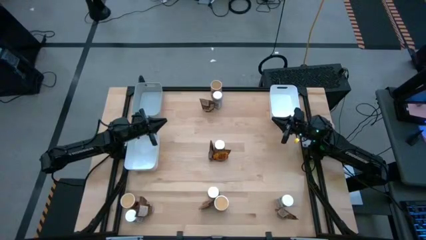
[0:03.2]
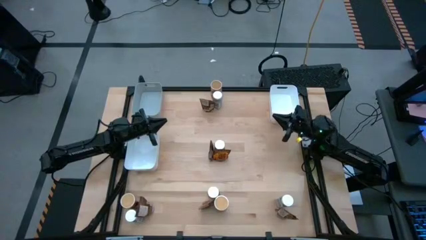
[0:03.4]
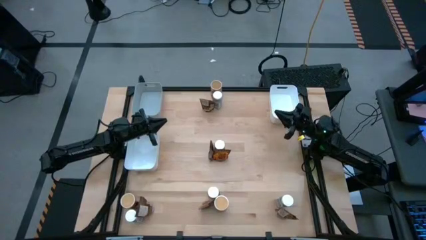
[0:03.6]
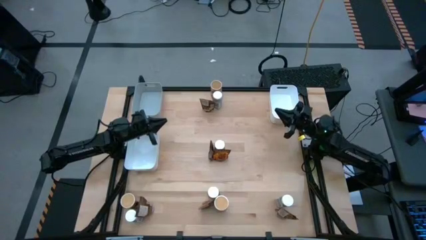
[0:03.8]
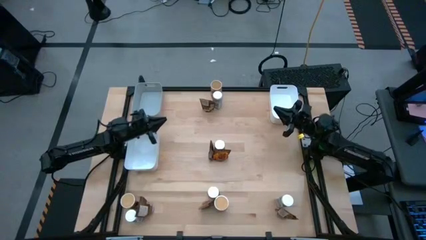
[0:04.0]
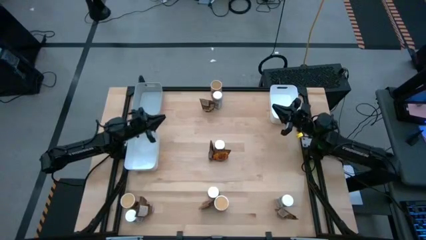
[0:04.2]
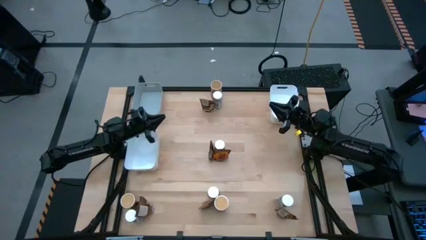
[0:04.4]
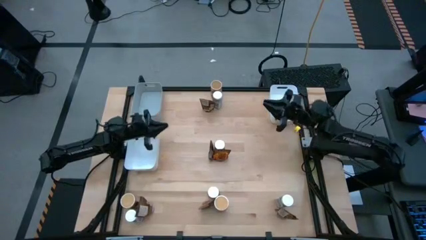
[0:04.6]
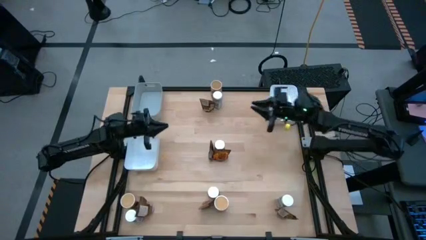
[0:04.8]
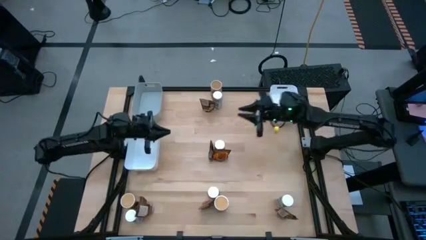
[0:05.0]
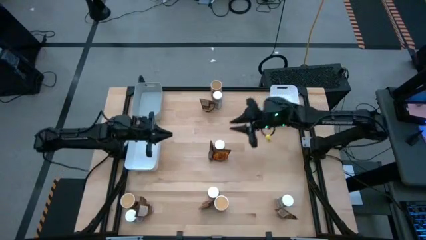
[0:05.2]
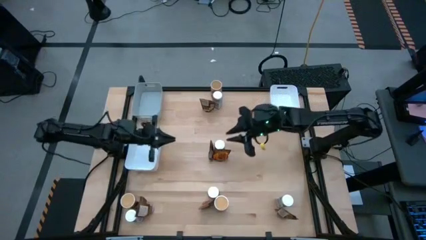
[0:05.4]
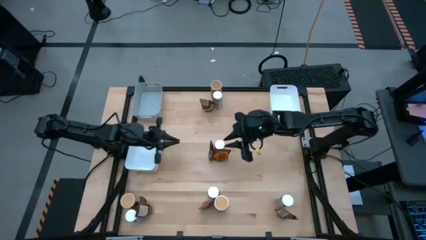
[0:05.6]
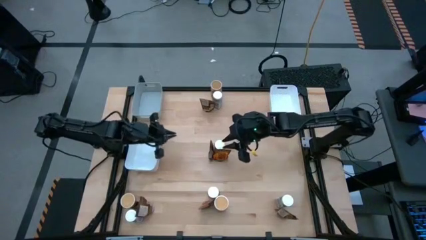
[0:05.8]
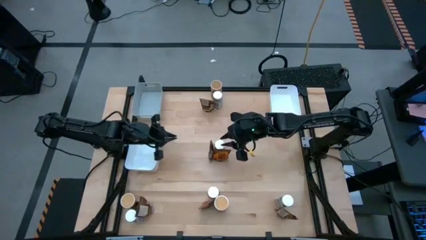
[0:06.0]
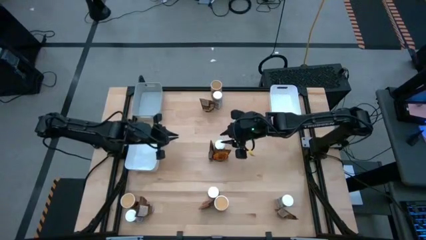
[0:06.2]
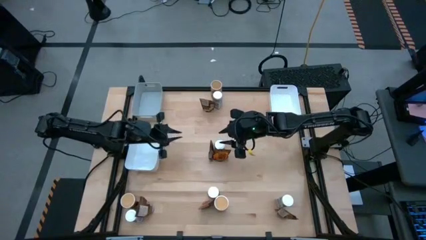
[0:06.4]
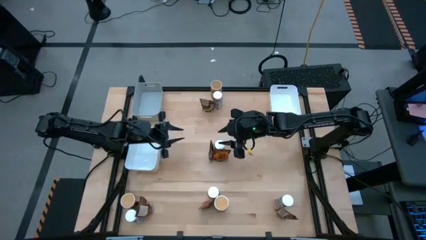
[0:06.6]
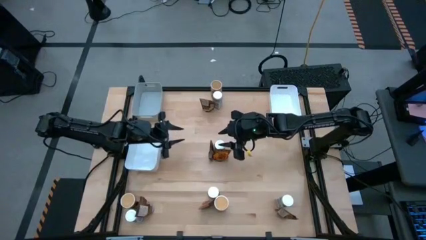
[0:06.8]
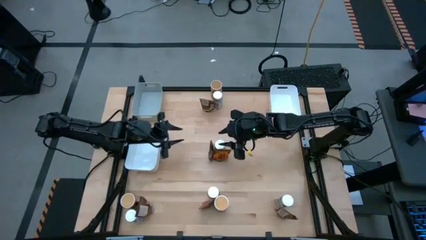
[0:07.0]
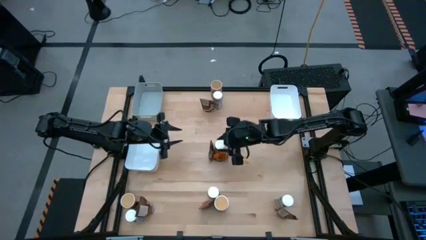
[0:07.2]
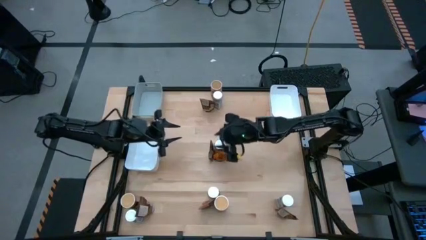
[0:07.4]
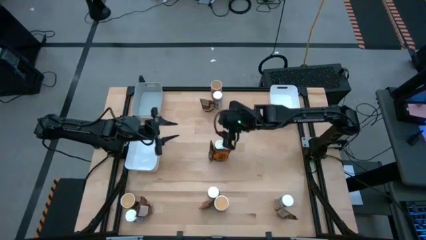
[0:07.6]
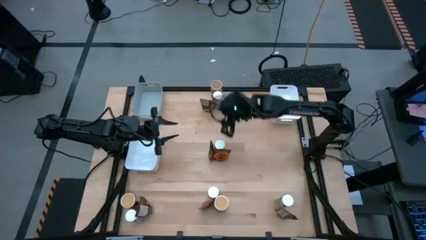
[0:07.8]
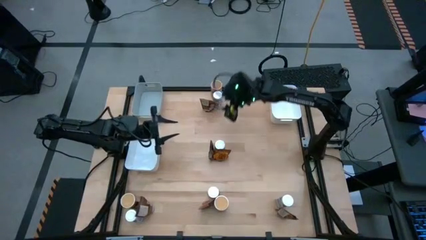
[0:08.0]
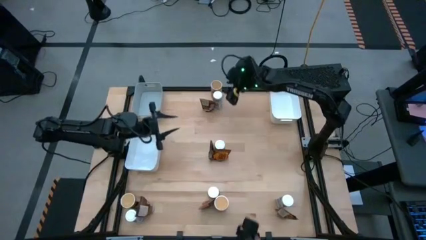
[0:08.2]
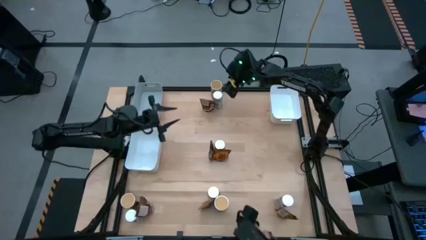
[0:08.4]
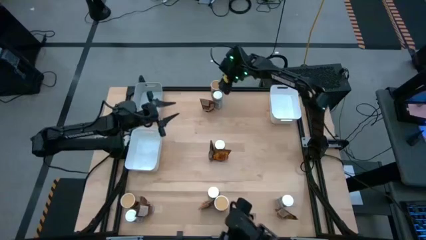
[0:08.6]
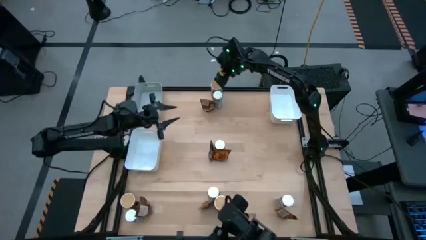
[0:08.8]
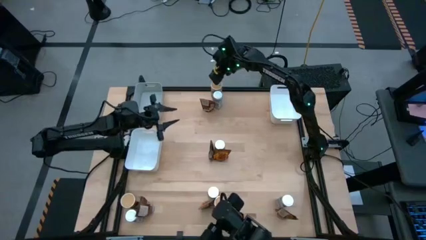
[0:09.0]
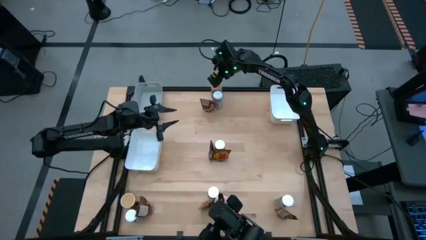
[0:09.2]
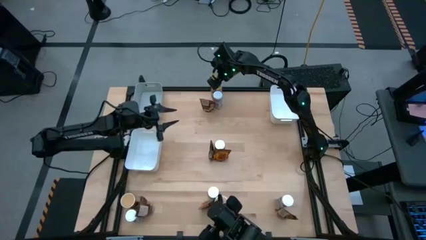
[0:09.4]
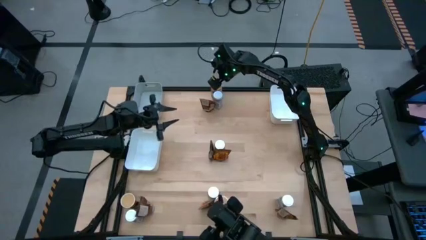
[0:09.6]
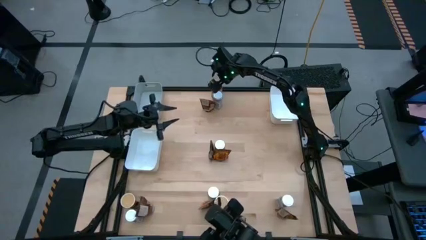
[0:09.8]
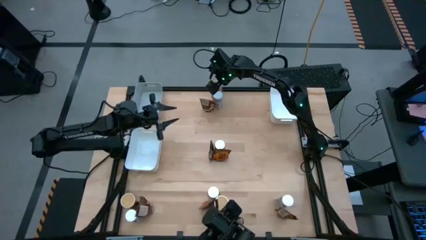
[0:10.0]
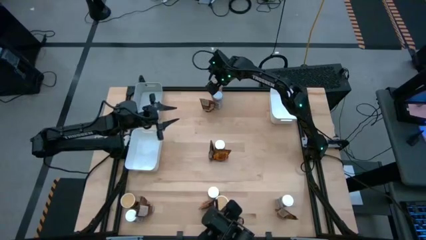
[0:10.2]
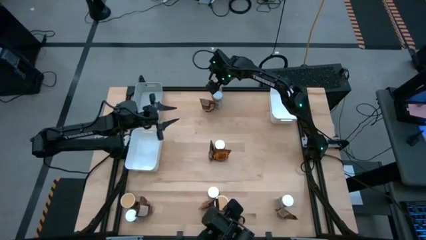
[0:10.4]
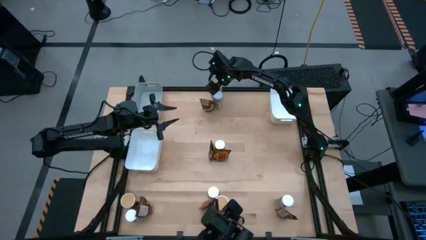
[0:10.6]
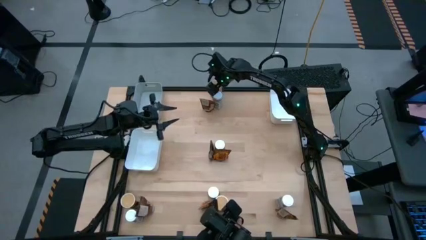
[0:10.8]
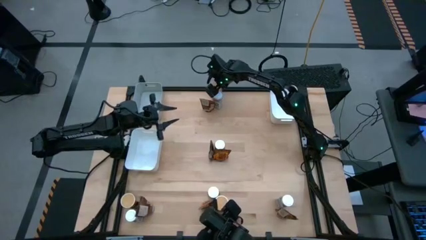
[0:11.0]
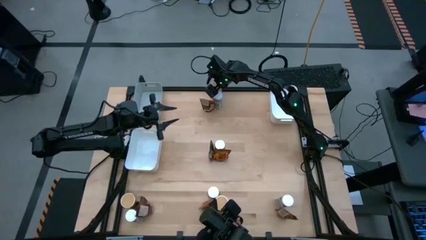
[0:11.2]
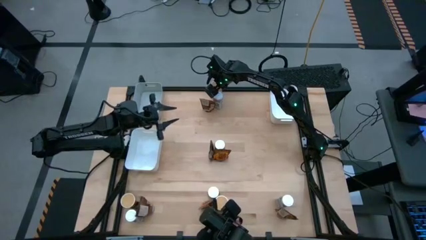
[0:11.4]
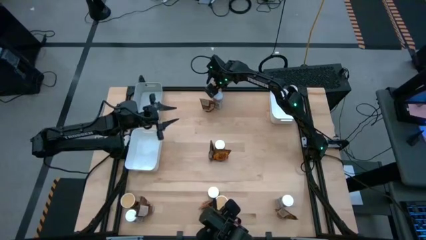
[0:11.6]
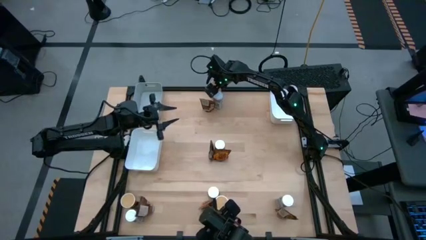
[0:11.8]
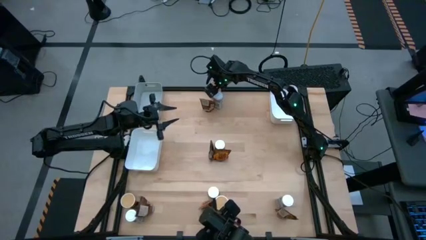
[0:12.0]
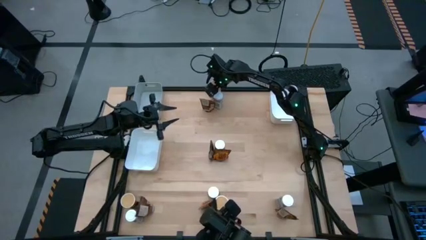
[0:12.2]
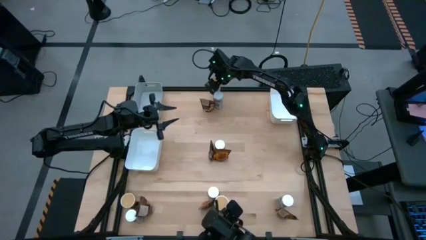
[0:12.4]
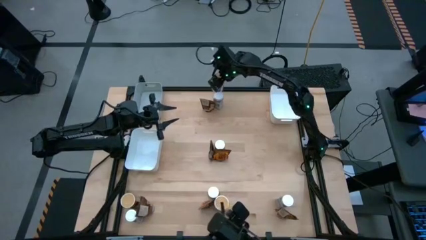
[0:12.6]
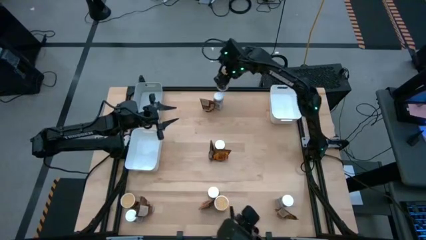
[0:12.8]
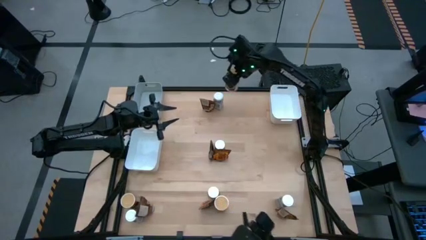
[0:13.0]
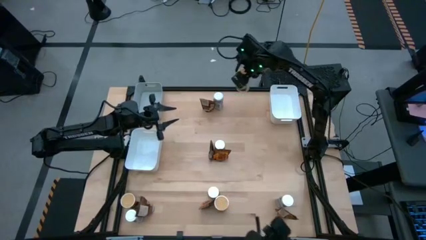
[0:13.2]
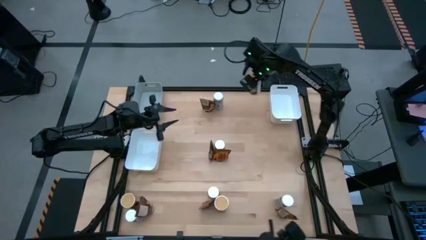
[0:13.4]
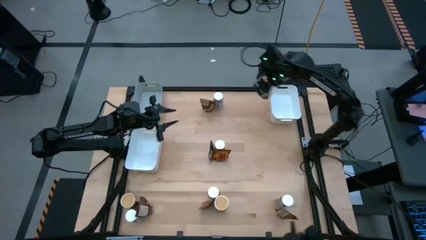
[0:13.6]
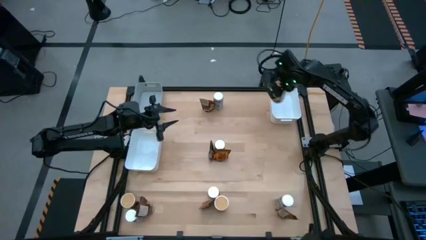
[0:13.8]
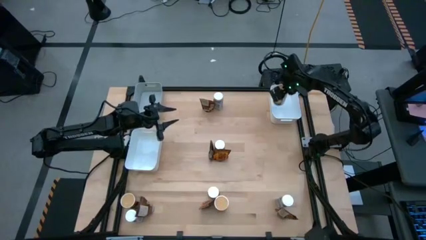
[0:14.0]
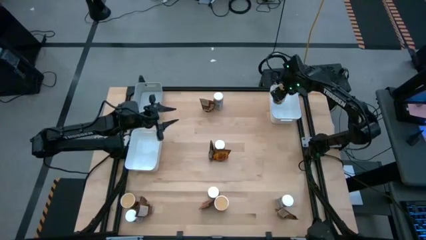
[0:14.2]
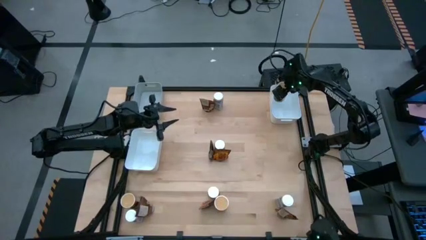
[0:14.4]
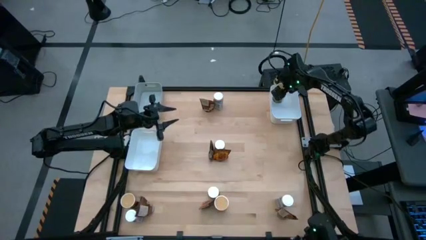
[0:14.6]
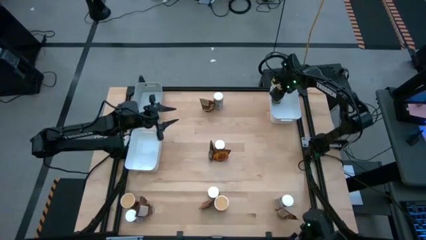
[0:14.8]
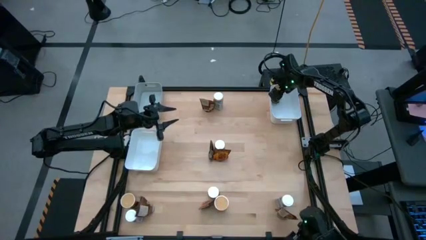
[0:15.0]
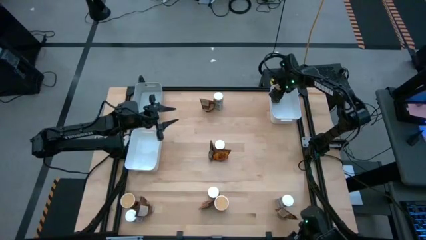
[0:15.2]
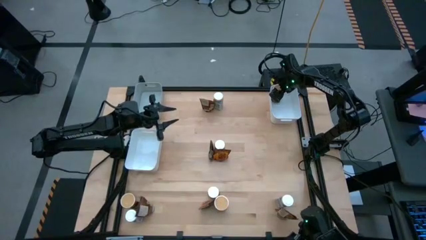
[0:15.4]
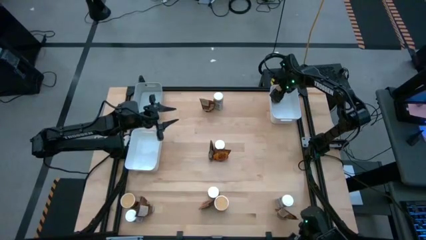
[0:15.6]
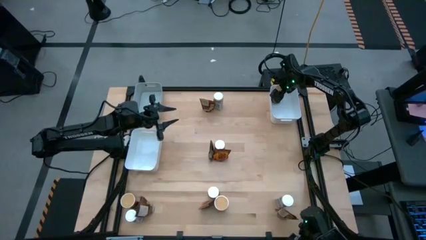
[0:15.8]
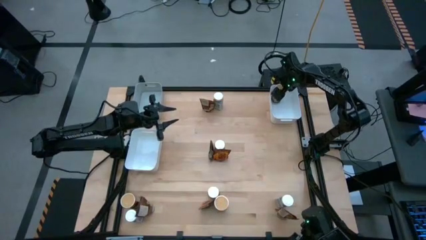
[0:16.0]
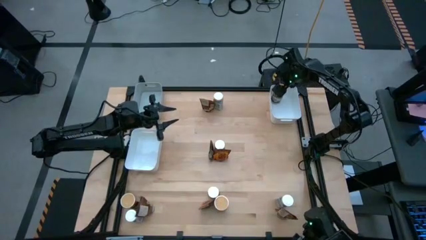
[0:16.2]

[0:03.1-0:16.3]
Task: Sort spices by type
Put the top gold seasoning bottle into the right white bin
